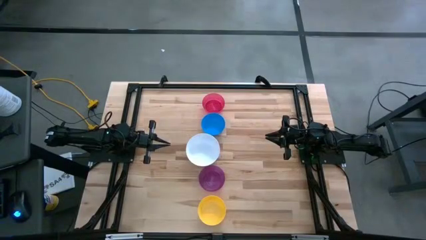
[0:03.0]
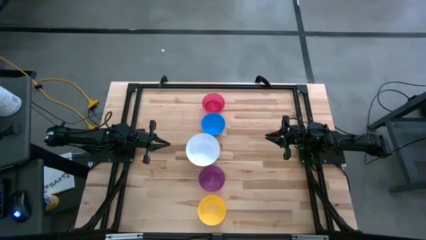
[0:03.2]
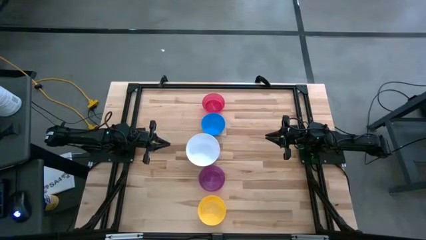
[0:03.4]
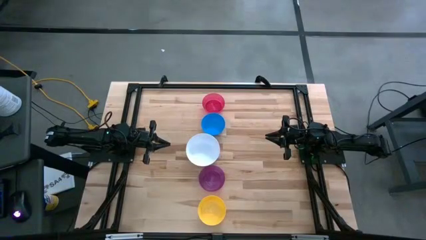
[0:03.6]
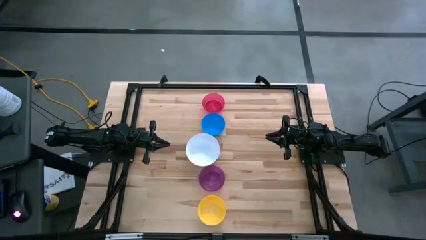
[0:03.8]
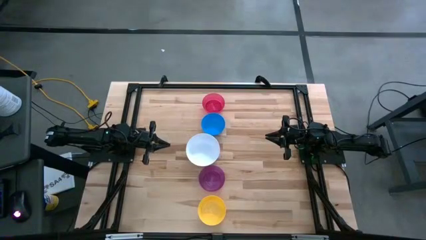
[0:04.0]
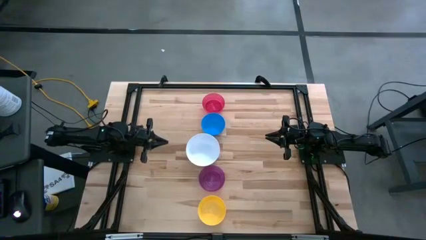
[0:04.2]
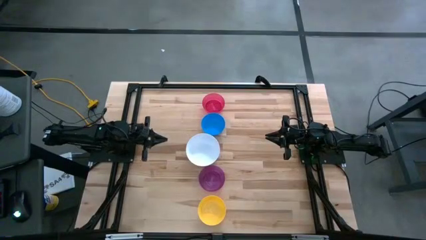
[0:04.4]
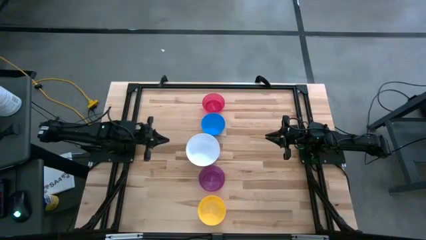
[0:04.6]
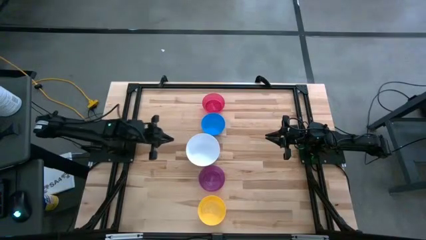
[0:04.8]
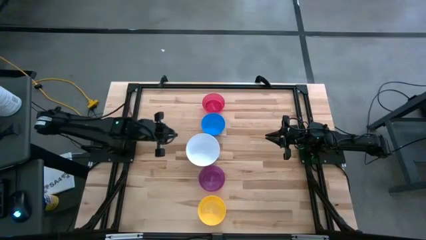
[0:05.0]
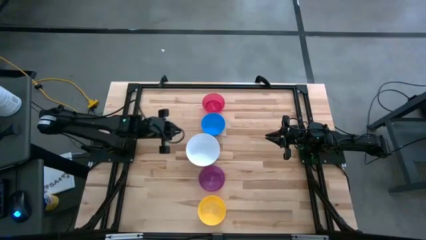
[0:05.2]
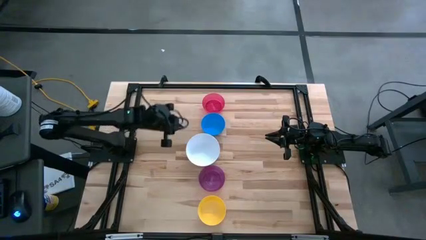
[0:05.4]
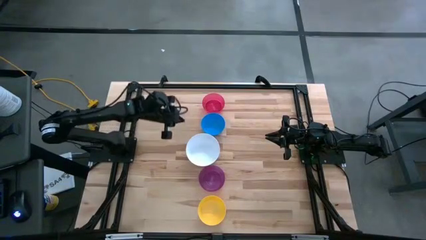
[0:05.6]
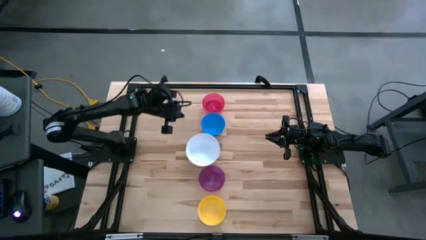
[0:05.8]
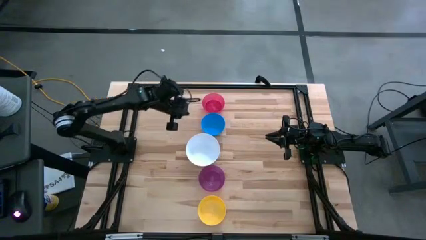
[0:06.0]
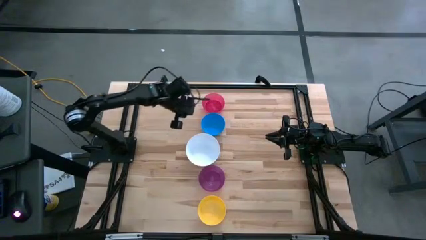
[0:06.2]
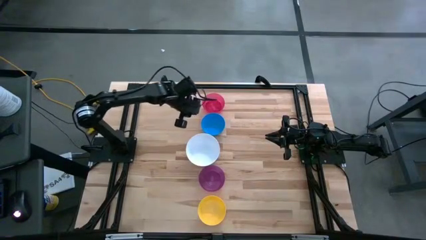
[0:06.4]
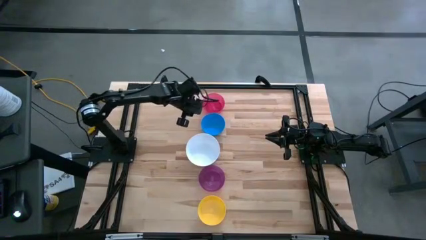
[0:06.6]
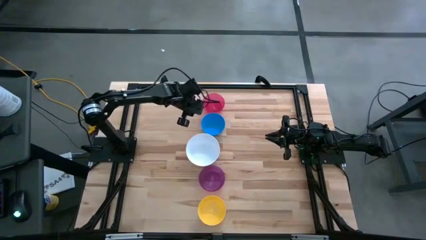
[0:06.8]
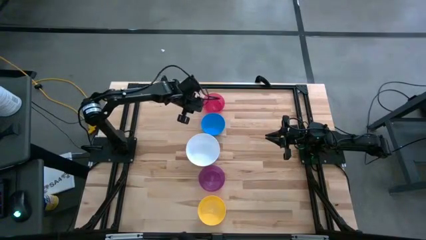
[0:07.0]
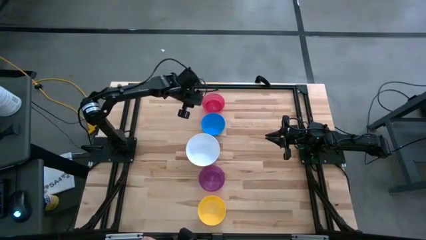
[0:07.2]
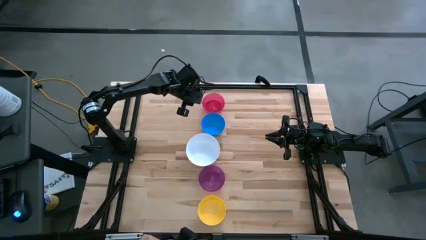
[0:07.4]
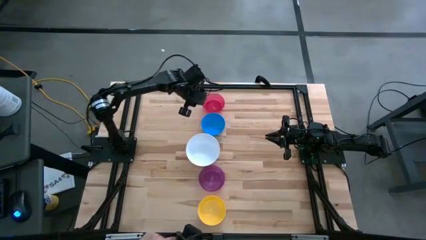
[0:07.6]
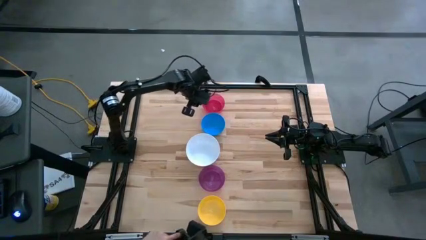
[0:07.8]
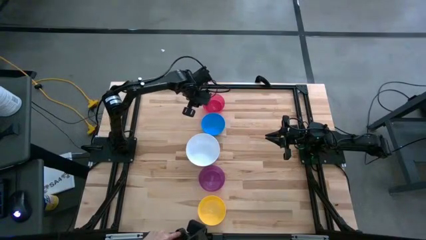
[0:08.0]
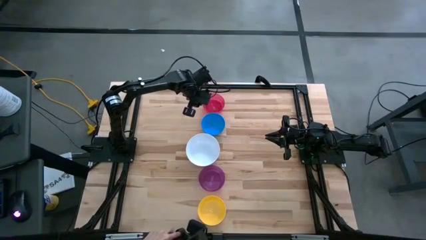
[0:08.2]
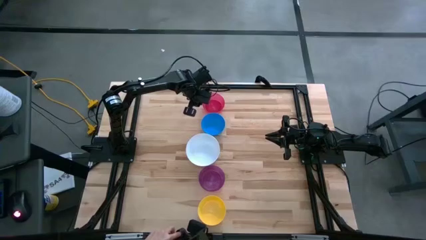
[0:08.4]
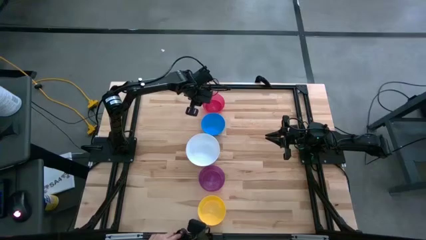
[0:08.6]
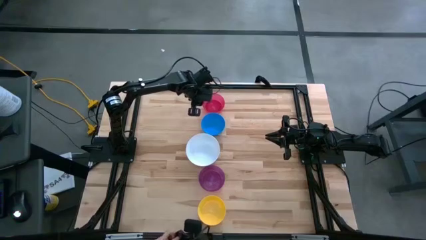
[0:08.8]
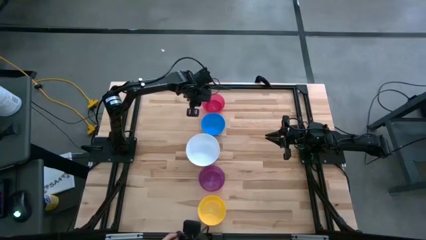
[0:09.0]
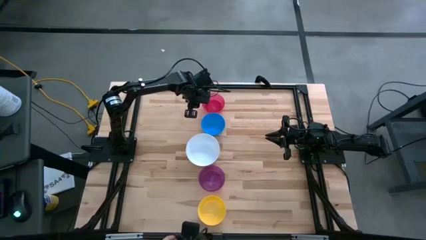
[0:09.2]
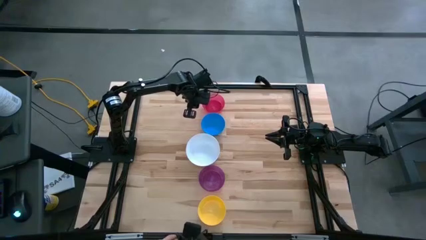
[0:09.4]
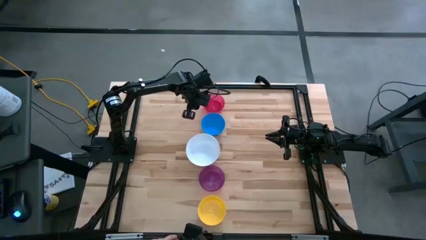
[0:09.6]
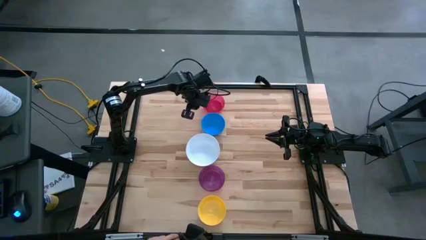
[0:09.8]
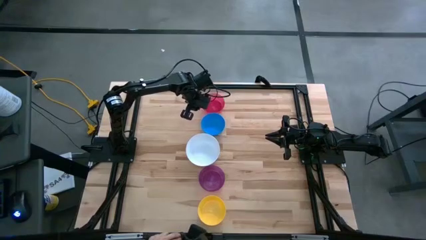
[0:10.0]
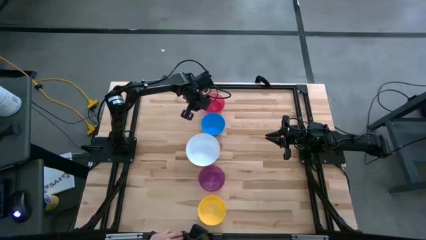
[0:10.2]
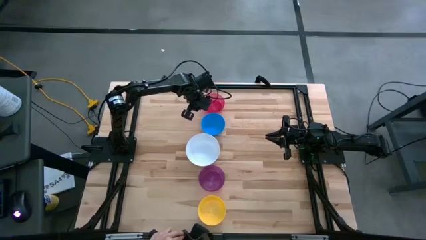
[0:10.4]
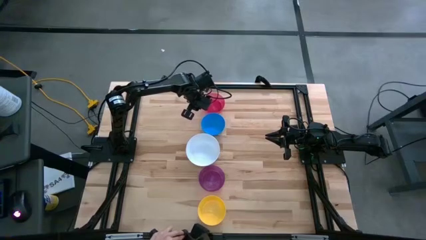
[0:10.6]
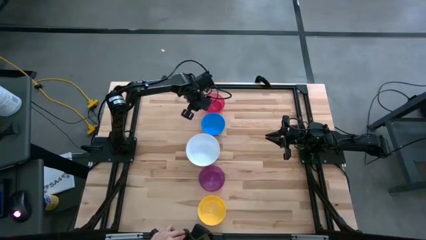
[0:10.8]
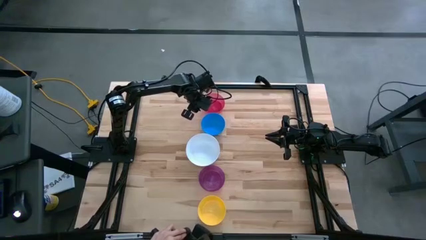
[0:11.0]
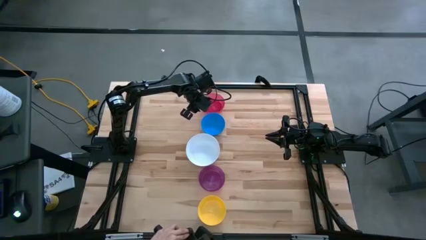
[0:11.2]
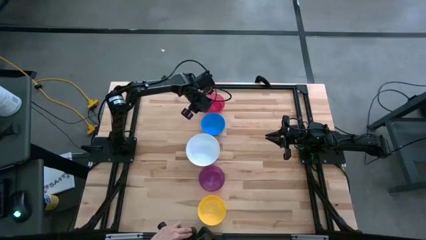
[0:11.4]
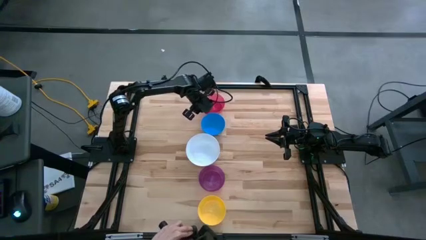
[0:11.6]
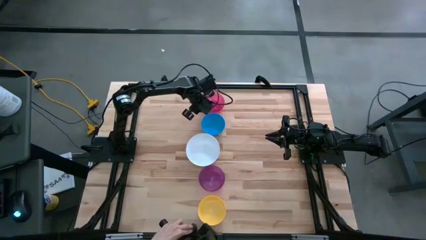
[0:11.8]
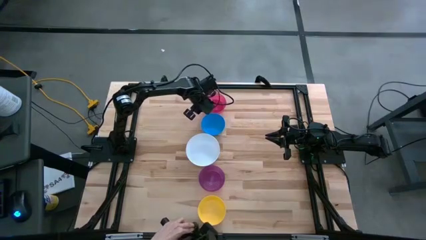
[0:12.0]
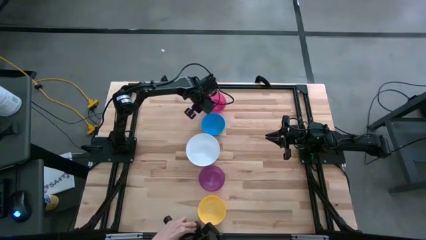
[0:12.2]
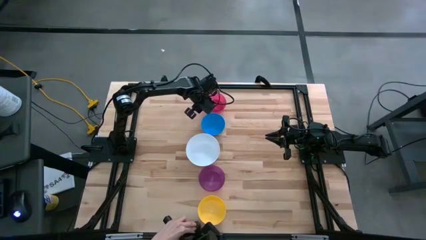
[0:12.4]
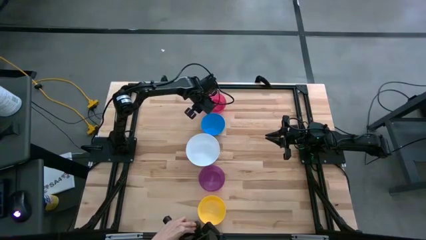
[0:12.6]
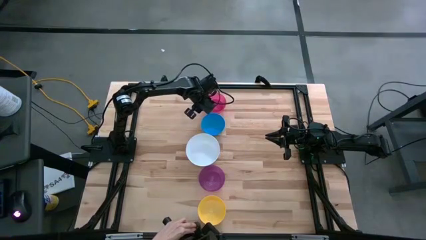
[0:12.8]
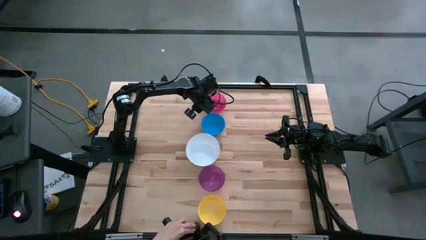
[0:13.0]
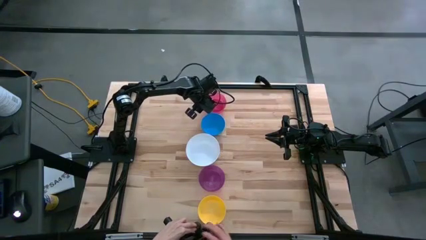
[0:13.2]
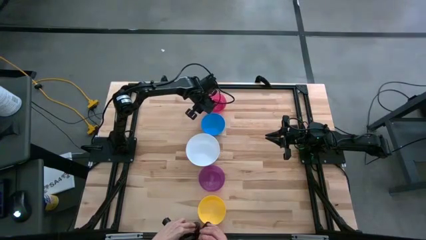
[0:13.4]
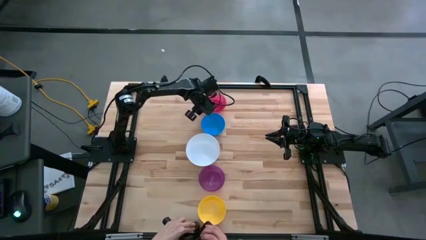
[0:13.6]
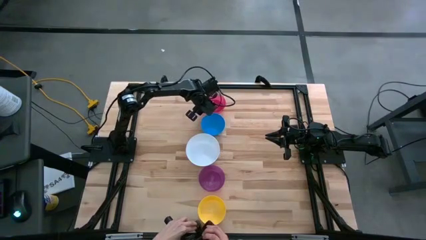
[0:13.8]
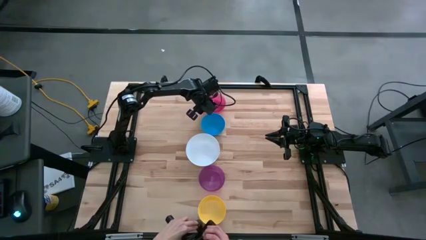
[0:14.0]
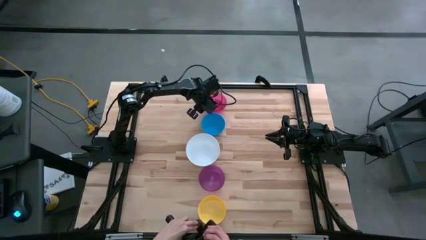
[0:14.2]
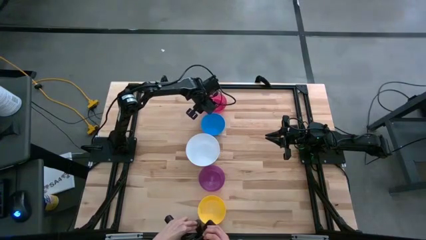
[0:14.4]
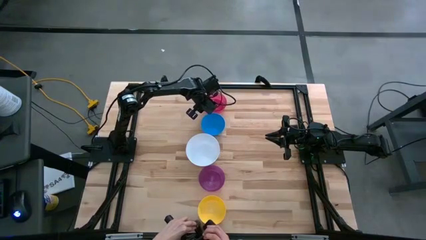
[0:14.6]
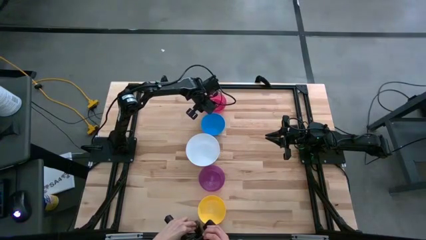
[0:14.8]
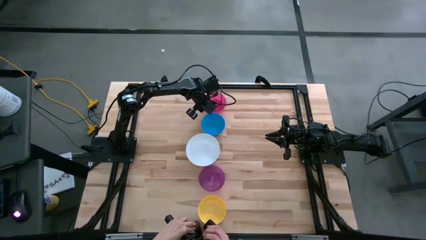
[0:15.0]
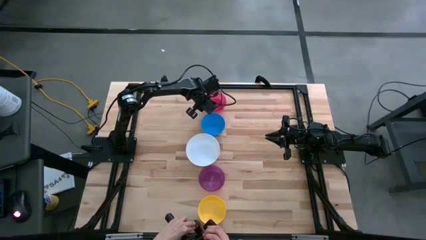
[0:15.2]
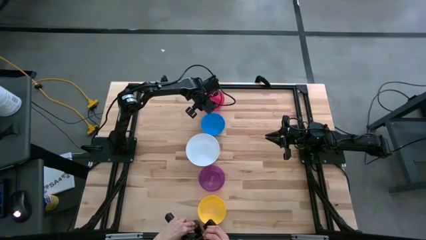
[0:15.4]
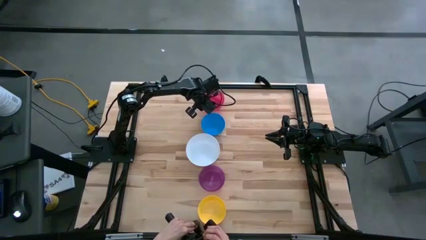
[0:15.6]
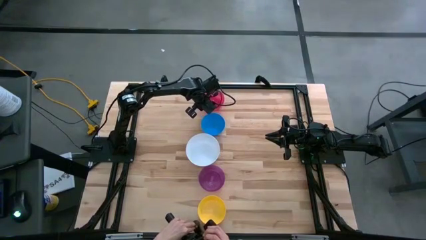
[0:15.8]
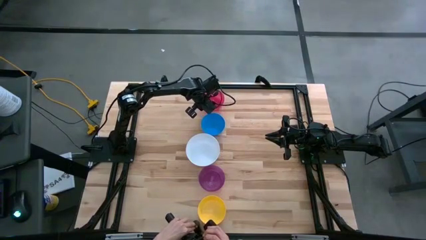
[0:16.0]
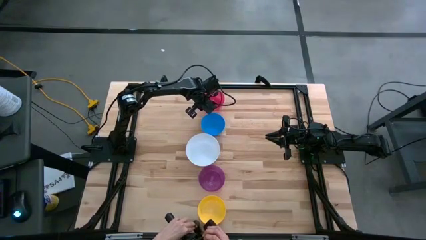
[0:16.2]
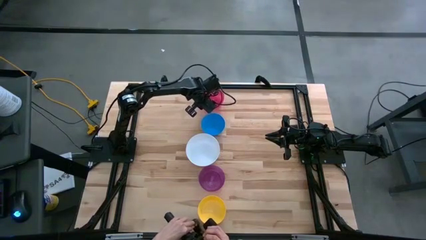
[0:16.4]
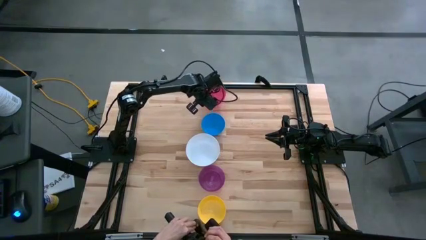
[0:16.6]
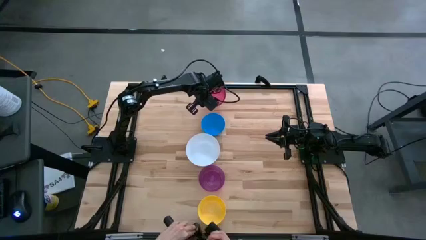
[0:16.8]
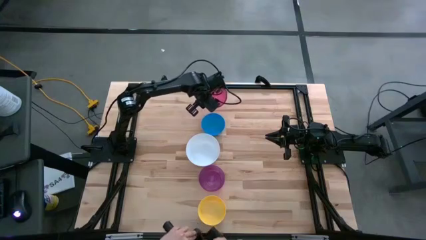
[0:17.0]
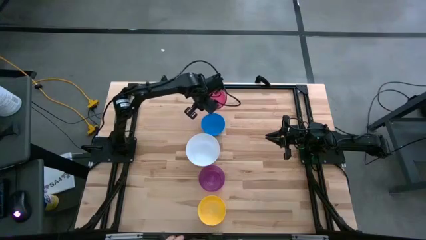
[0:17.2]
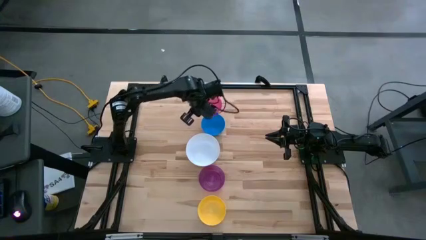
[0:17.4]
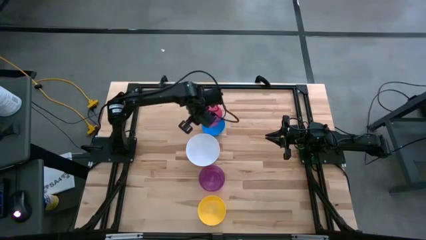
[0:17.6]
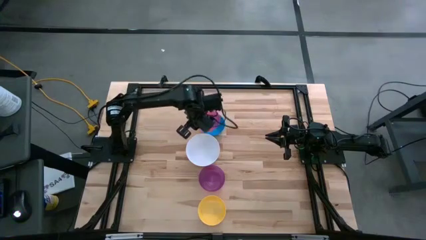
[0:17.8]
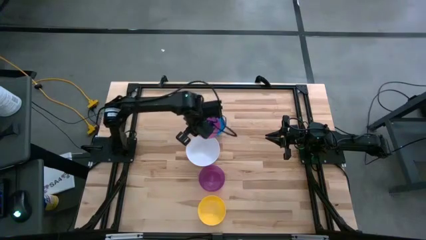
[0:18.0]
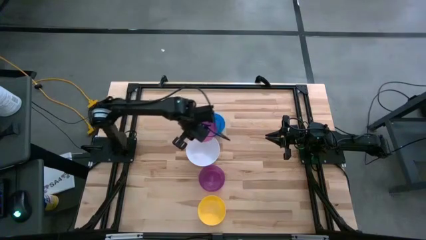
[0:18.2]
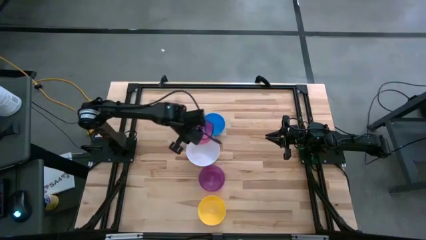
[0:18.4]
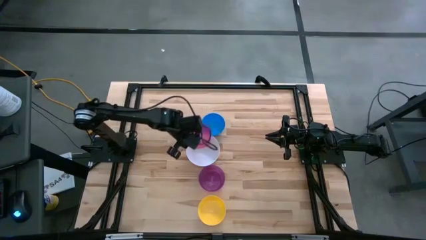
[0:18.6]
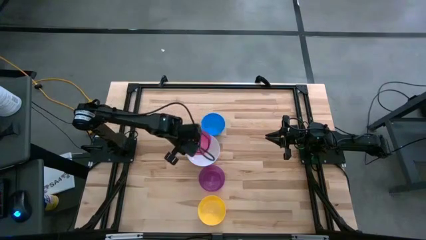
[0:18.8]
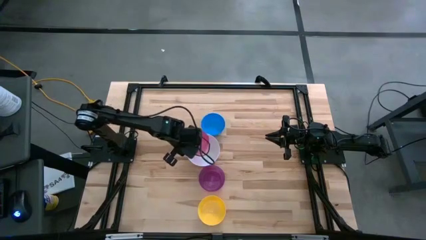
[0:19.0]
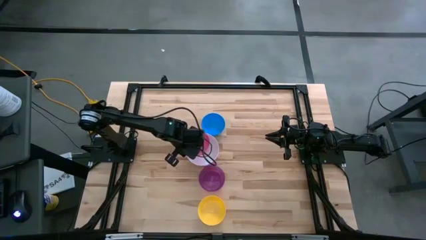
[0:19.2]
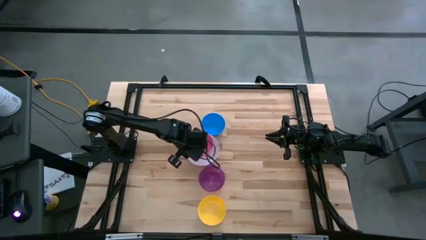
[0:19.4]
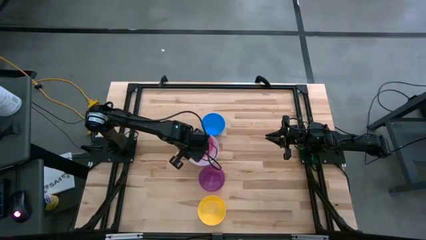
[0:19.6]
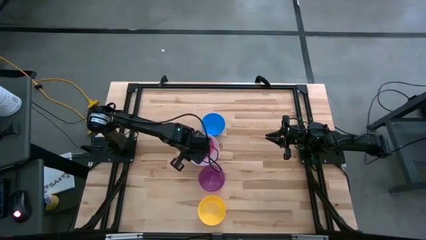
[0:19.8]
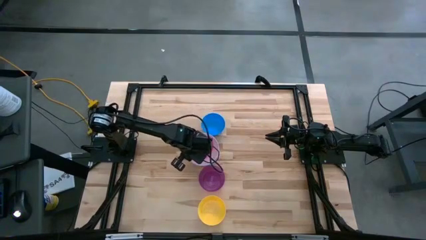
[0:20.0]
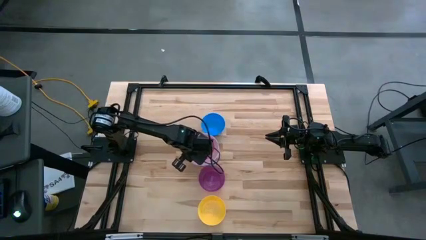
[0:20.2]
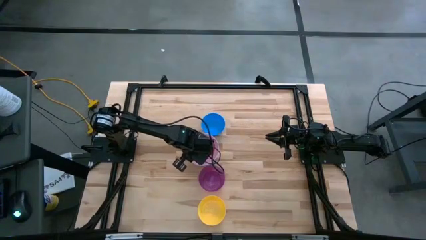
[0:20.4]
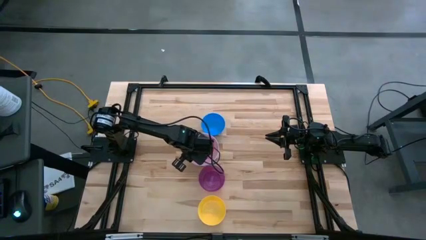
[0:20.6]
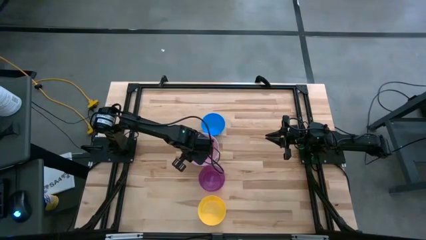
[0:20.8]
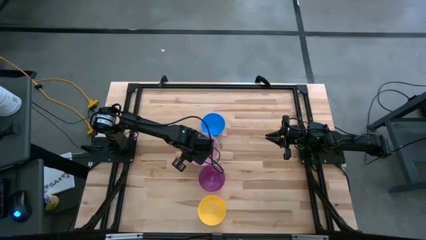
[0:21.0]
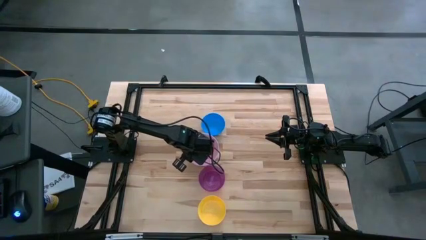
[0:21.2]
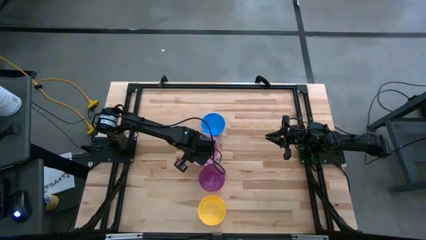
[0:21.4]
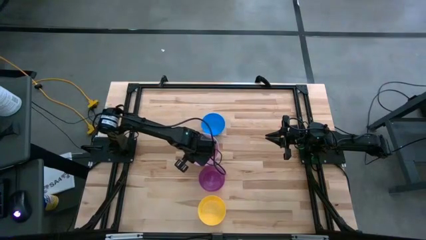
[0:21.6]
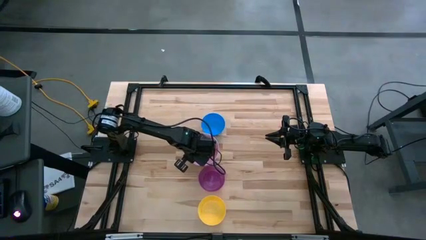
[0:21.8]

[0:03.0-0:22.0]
Stack the red bowl on the white bowl
